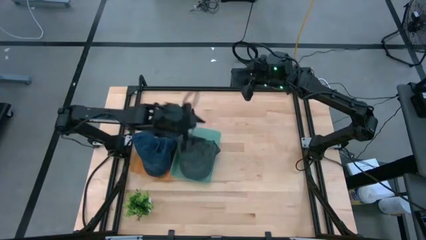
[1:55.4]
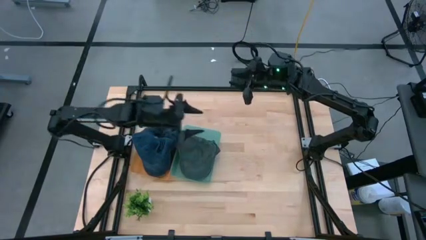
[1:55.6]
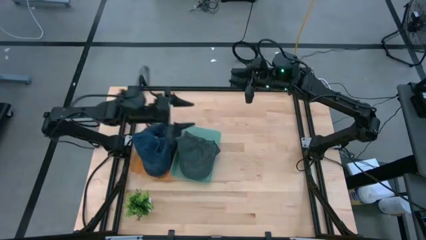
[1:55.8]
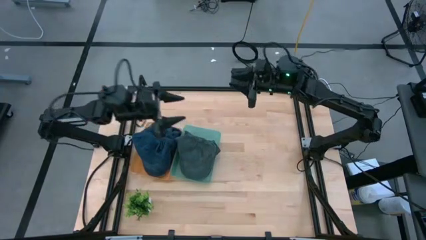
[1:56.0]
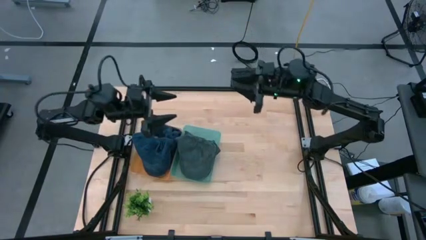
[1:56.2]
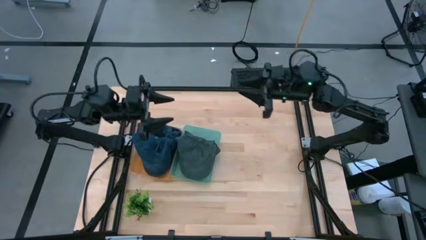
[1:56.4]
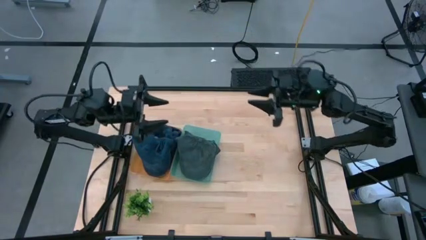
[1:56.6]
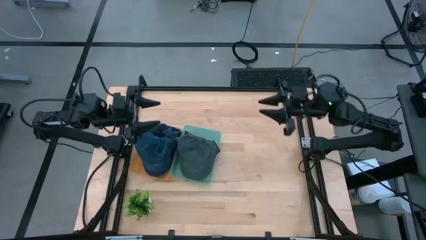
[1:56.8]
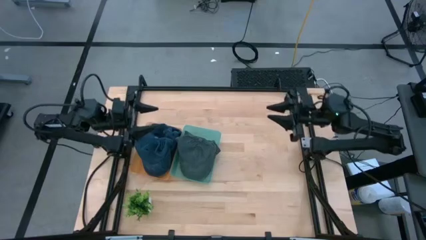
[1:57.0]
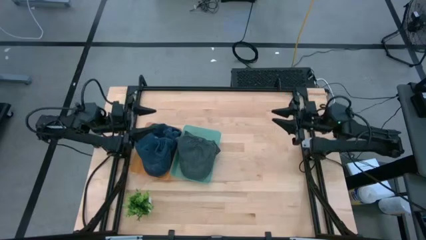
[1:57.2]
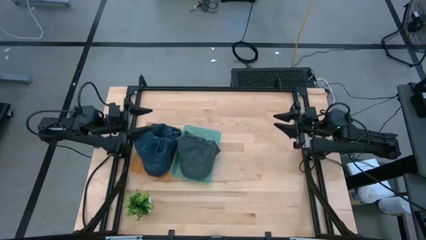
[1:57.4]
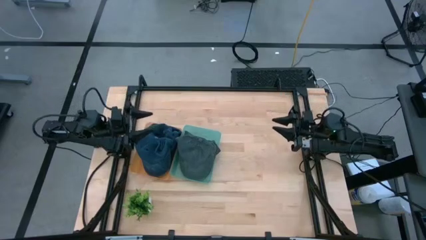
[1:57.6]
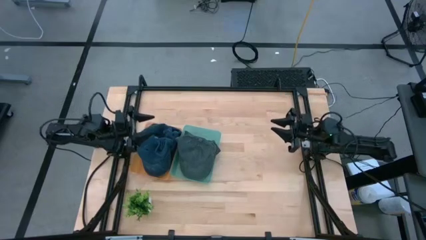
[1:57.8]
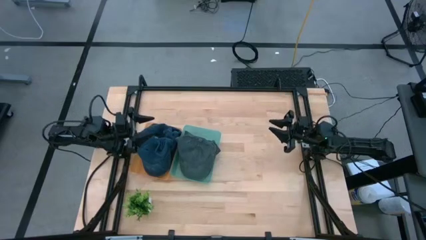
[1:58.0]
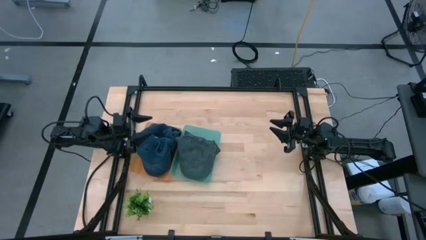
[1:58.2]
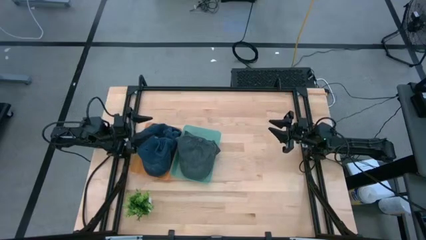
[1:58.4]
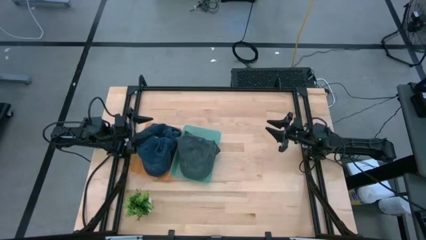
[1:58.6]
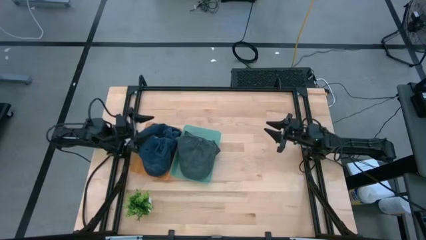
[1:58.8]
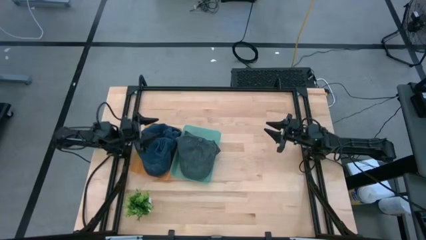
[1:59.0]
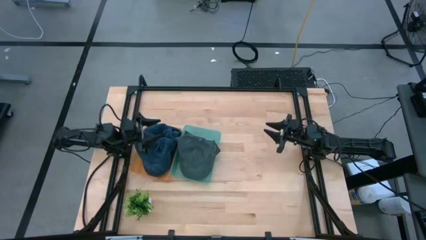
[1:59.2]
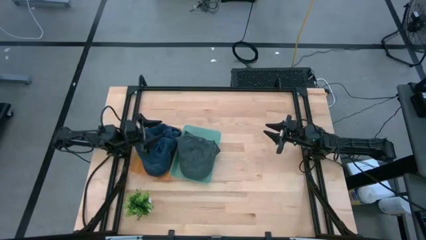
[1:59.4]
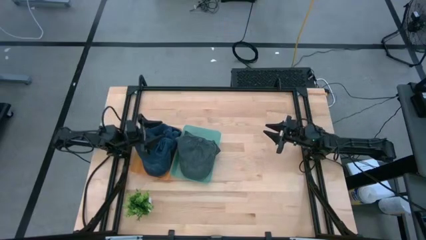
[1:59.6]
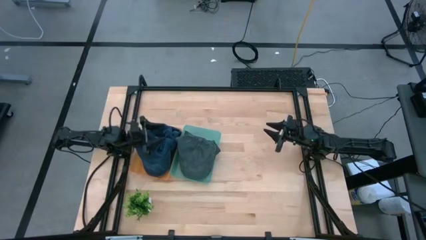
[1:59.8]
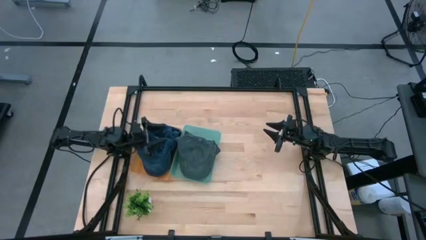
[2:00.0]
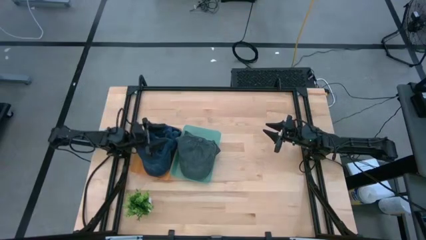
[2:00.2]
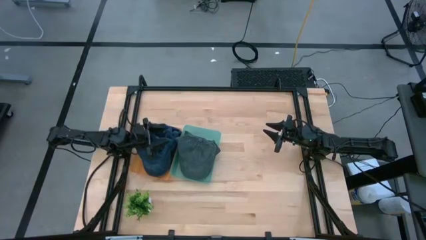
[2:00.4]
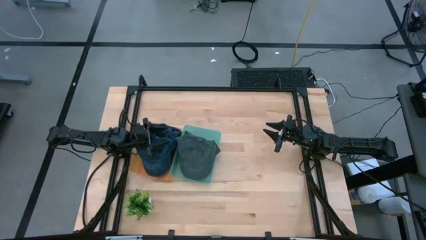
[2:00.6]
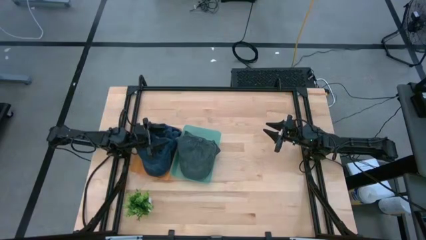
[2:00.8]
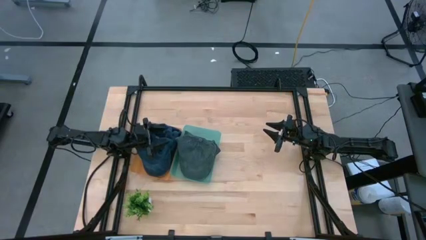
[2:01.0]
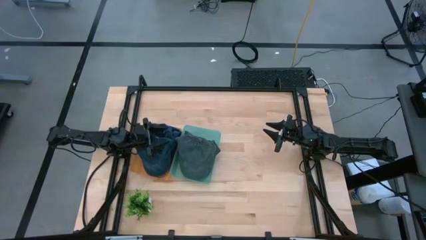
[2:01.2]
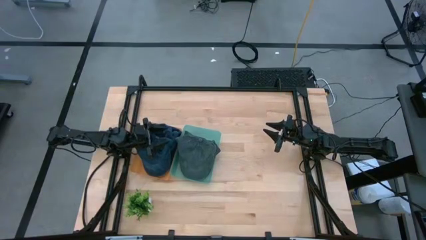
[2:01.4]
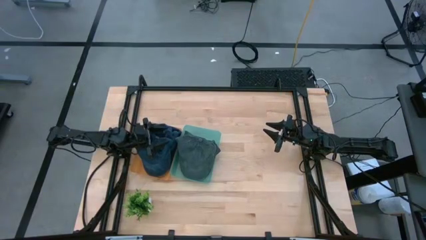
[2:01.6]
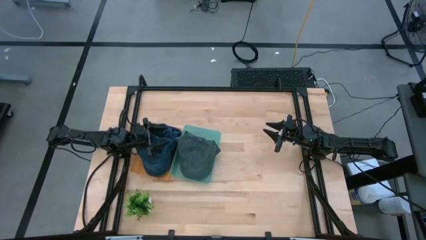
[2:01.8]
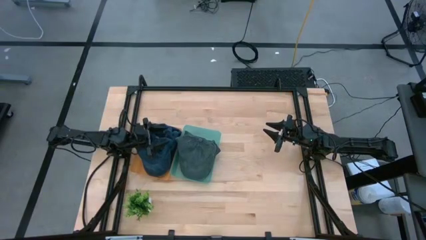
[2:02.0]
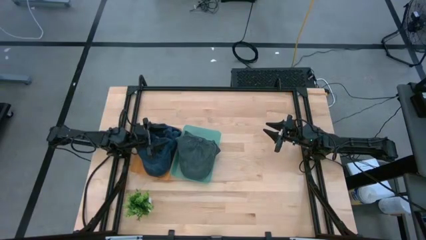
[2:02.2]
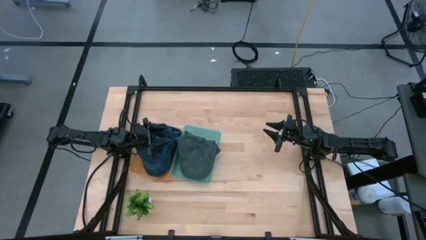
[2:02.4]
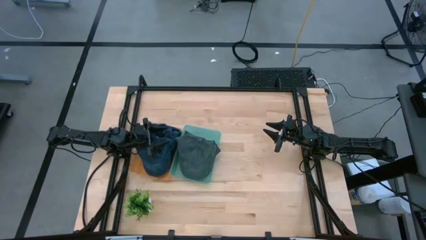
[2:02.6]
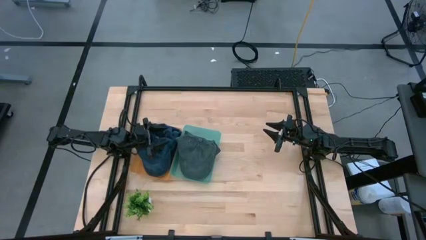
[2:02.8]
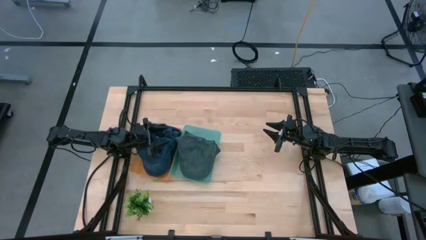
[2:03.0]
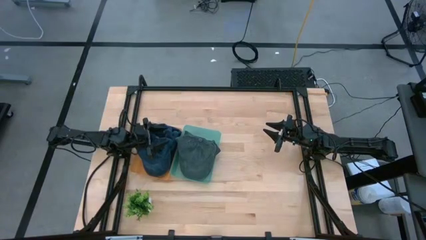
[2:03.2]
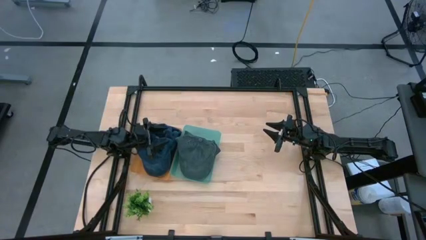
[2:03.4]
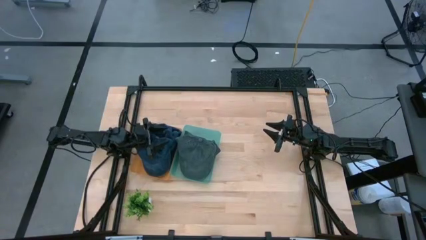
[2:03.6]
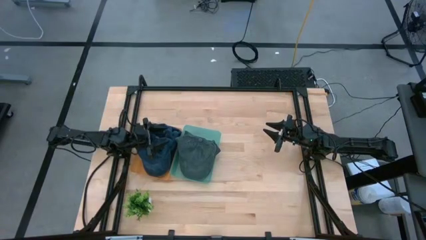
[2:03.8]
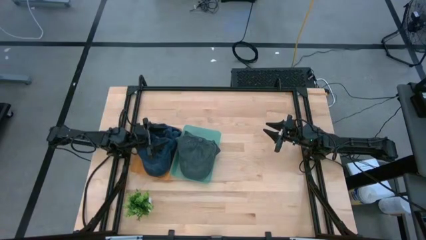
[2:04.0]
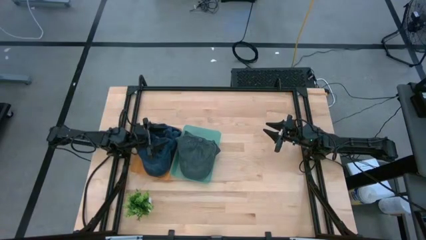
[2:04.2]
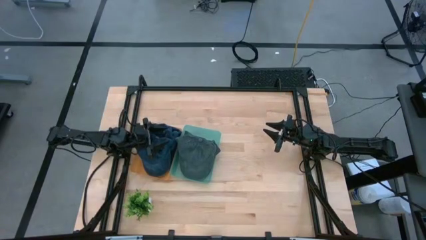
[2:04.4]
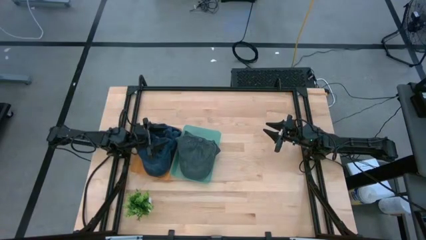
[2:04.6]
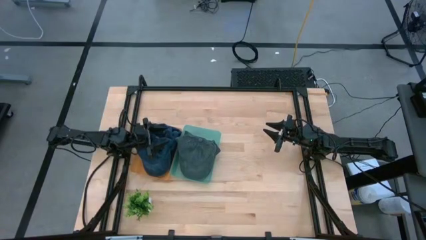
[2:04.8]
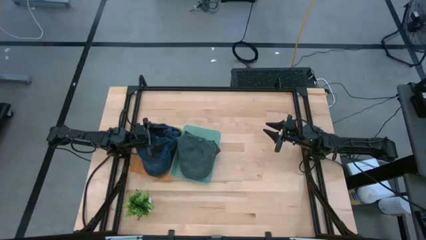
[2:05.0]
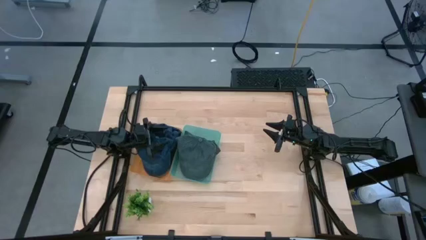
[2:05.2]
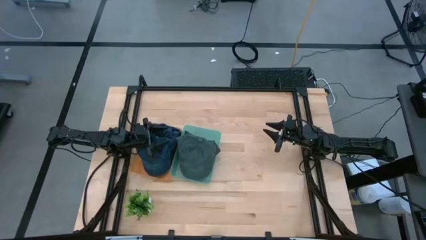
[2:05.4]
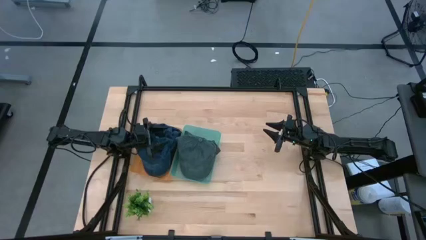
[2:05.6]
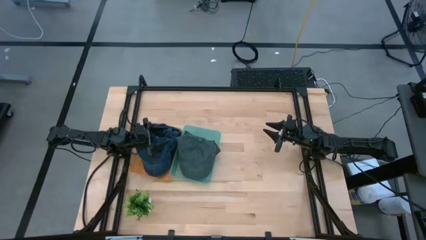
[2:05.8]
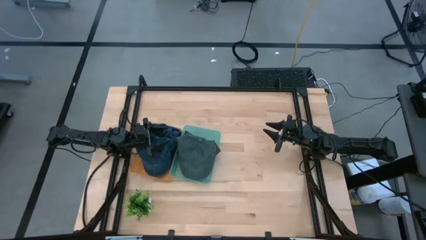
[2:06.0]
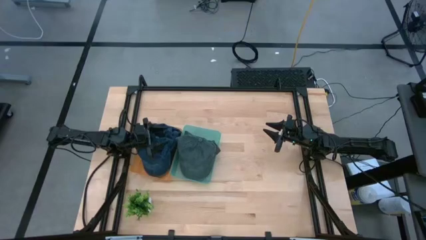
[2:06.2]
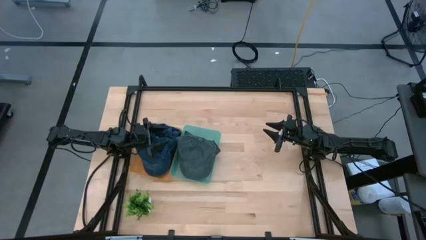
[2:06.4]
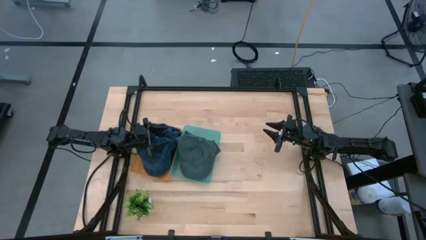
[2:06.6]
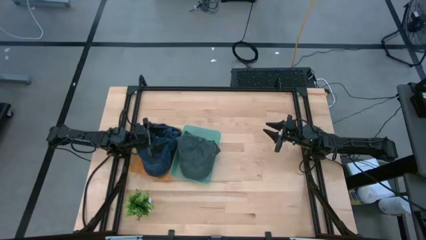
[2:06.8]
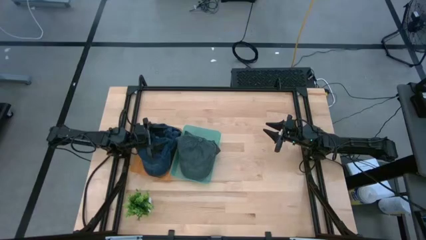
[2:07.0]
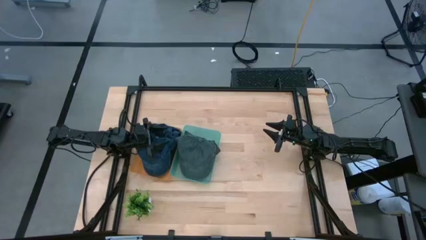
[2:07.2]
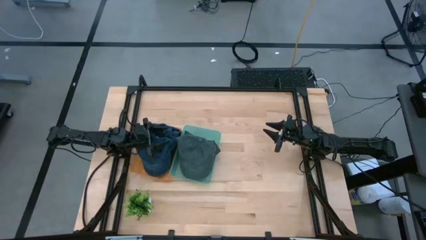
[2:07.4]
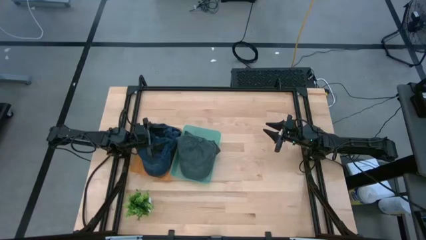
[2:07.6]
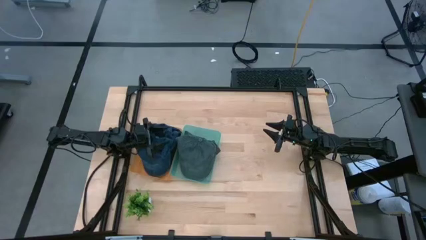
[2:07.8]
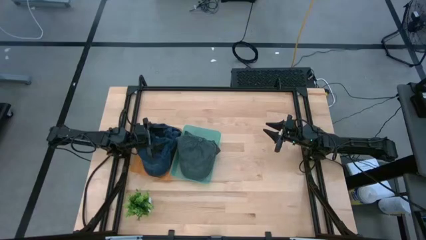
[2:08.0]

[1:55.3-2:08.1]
Task: Pick & Place hat
Return to Home Position

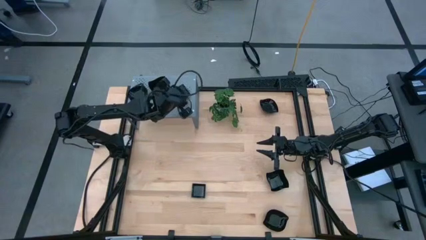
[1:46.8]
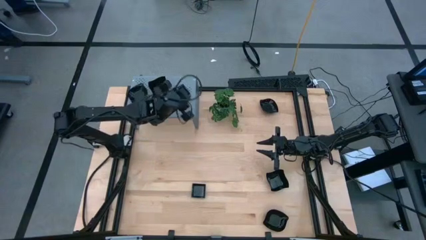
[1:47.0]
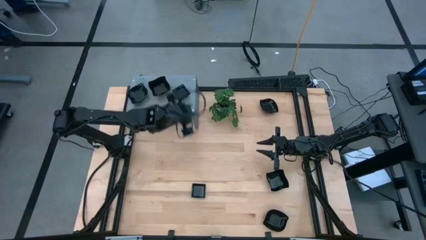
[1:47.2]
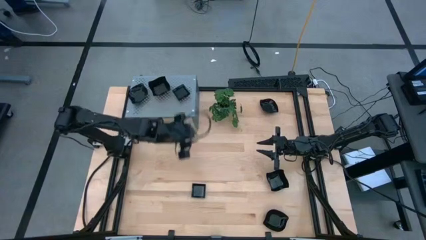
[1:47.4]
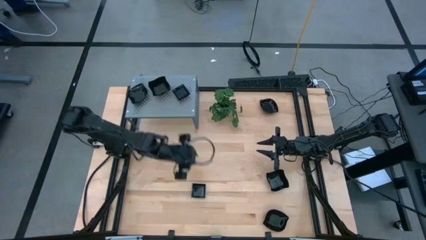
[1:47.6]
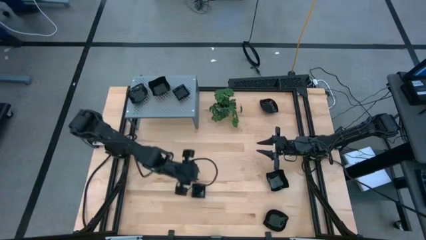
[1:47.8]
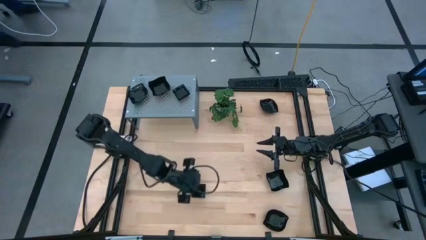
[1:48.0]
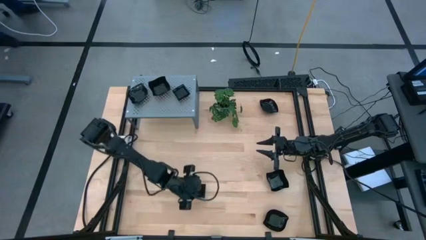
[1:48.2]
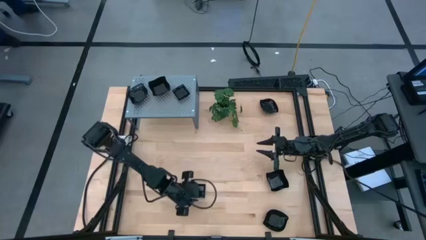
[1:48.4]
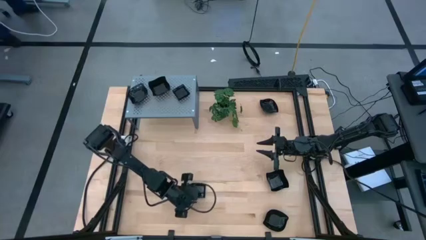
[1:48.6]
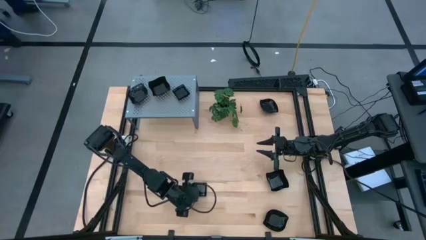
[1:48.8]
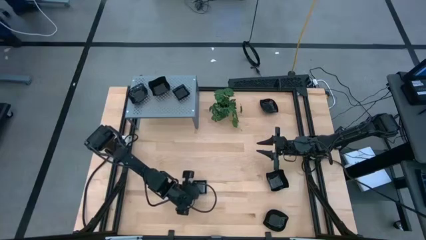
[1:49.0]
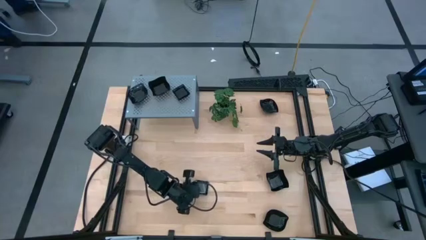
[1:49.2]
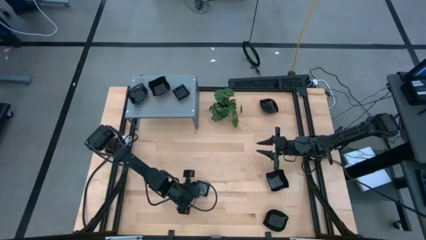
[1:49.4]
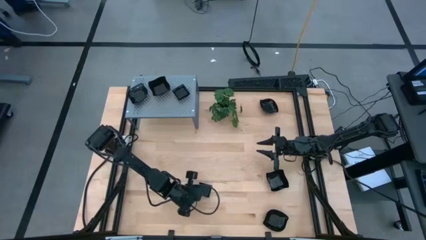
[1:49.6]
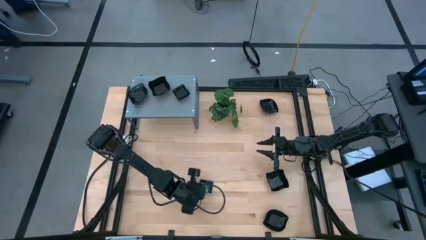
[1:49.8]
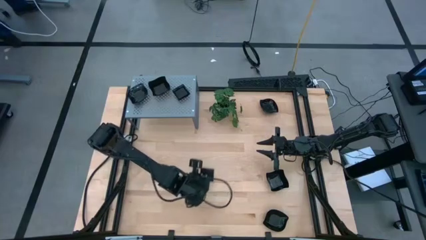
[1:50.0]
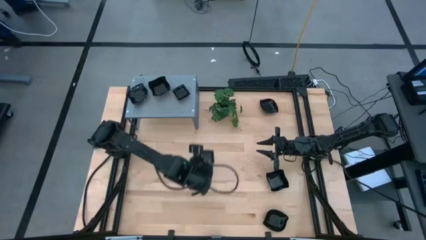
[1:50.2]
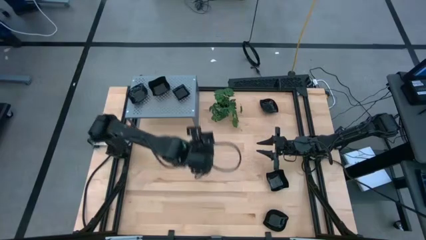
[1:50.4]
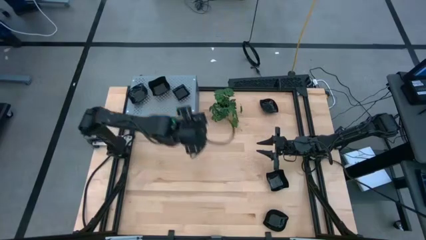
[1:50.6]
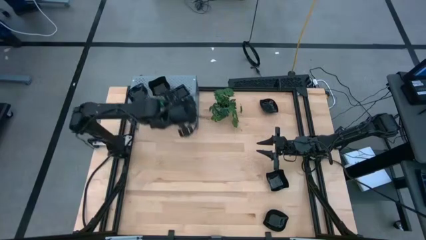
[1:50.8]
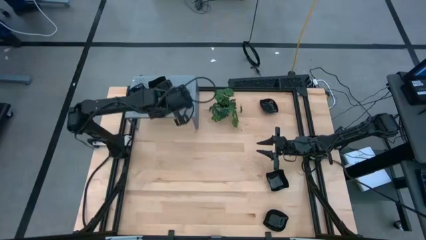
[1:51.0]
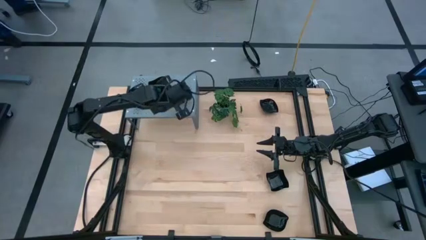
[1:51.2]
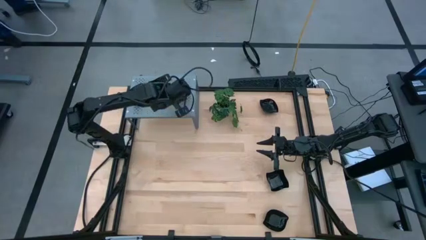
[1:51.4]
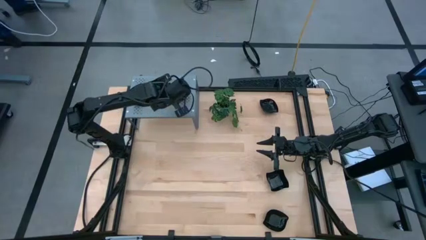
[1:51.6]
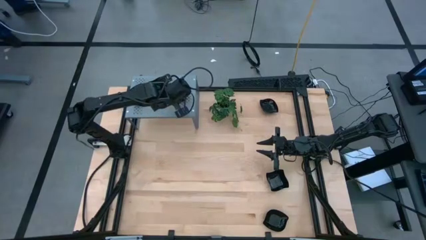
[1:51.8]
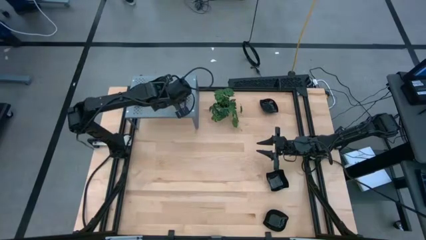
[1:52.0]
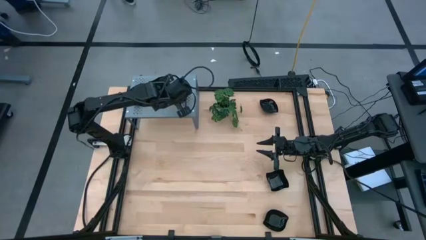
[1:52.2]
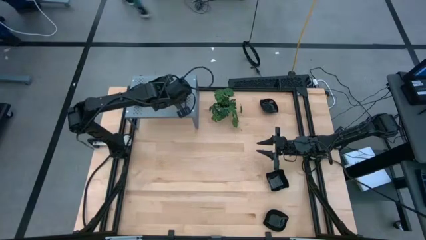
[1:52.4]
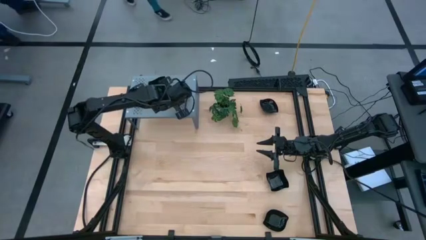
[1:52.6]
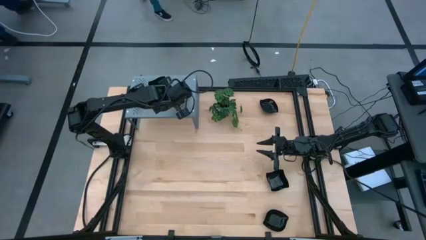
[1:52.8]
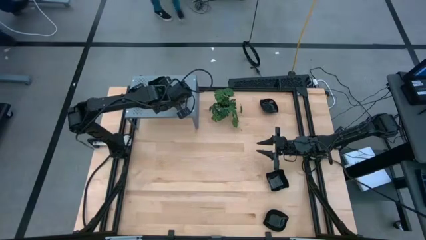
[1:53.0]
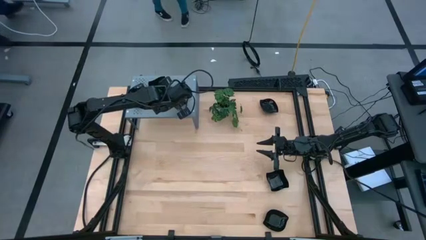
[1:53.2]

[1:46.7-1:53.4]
Task: Pick & Place Mini shaped plates
Stack the black square plate on top of the black square plate on the shelf
